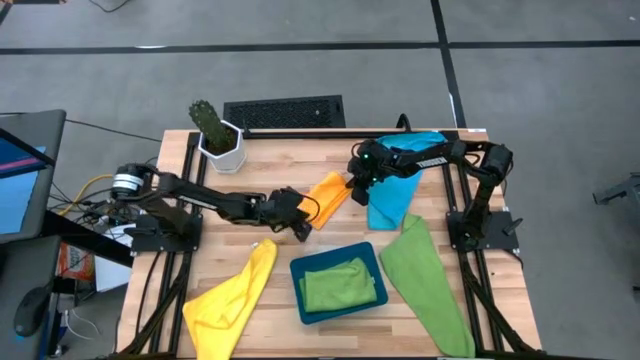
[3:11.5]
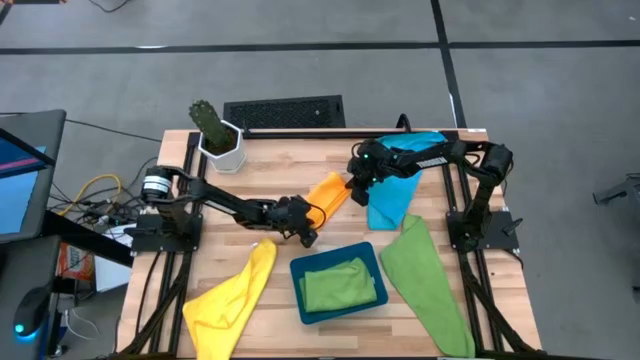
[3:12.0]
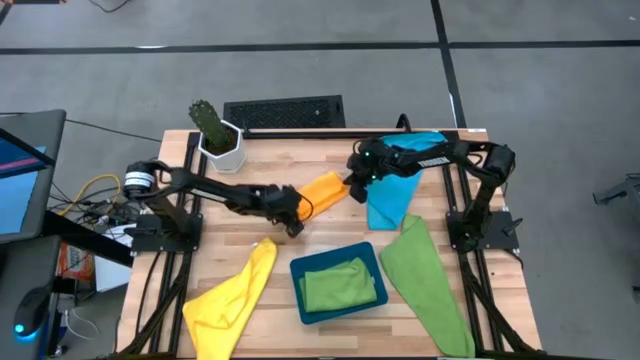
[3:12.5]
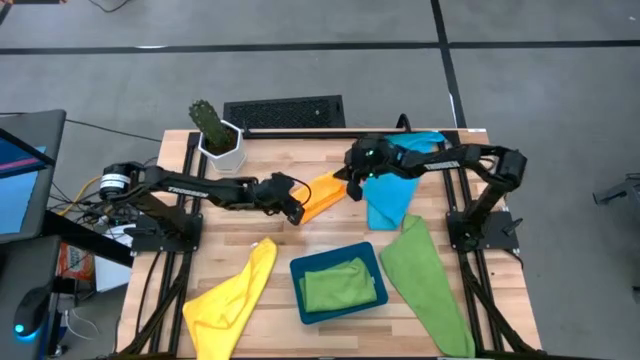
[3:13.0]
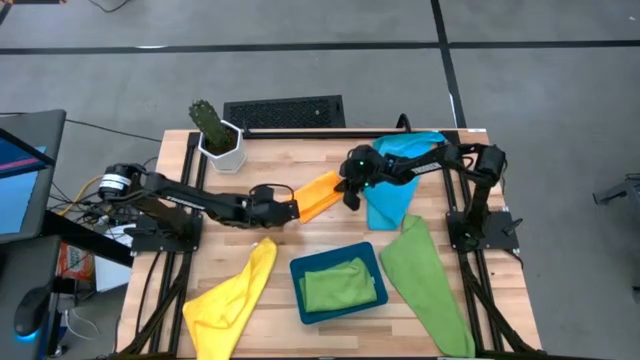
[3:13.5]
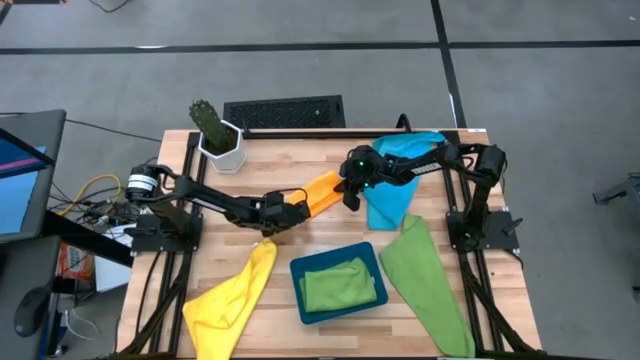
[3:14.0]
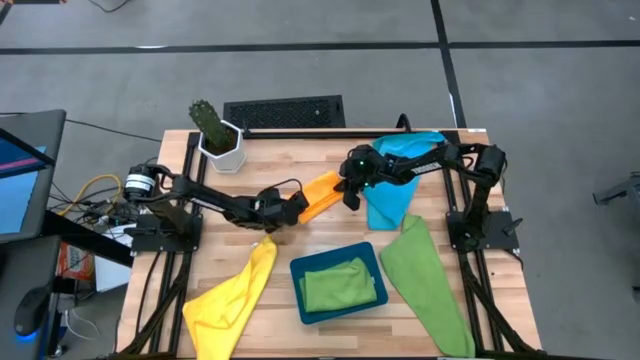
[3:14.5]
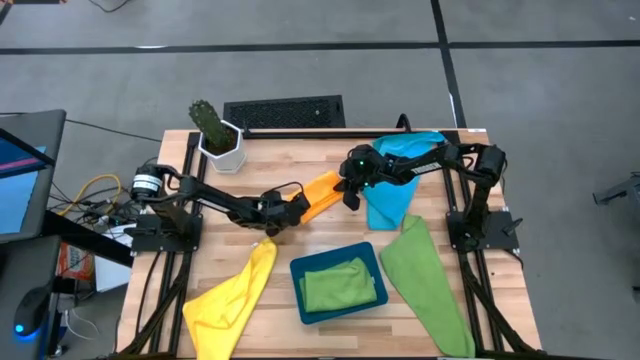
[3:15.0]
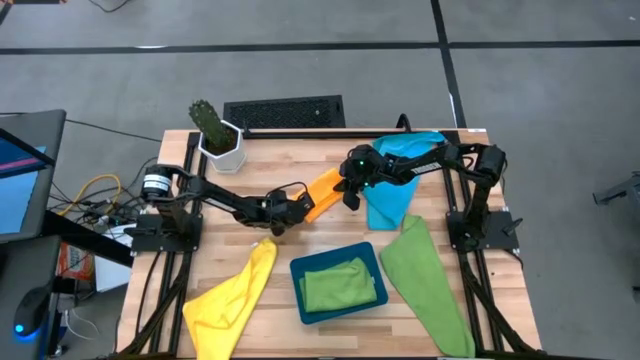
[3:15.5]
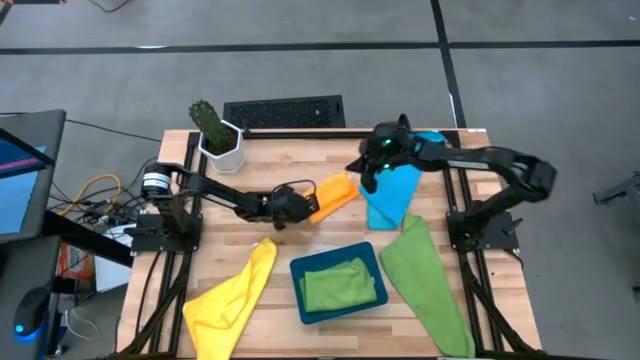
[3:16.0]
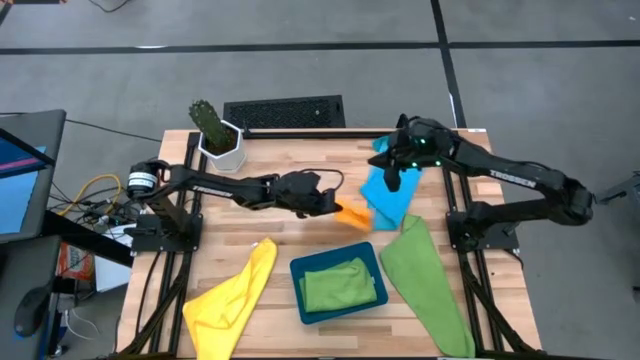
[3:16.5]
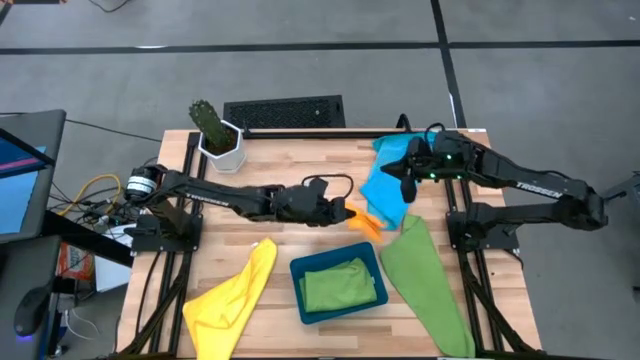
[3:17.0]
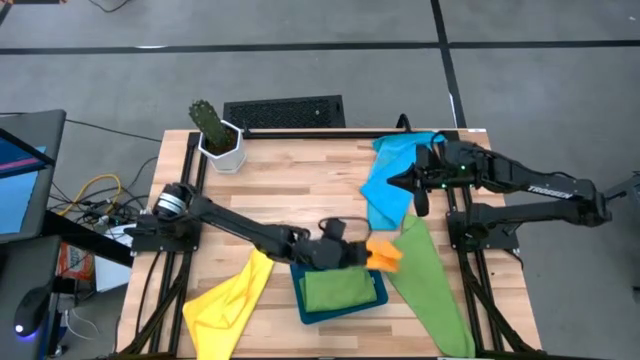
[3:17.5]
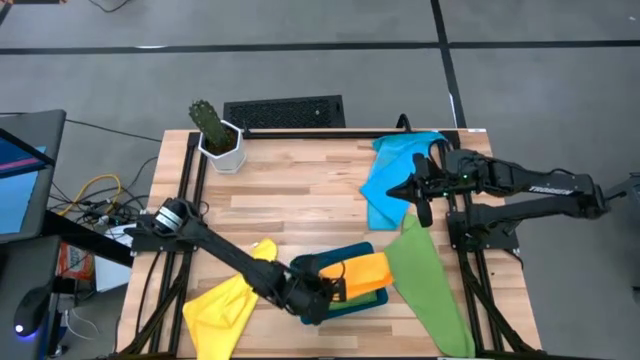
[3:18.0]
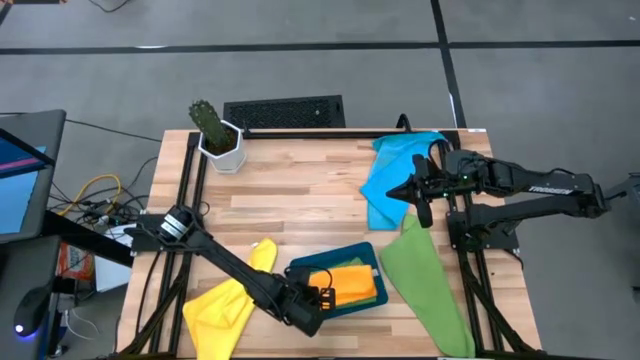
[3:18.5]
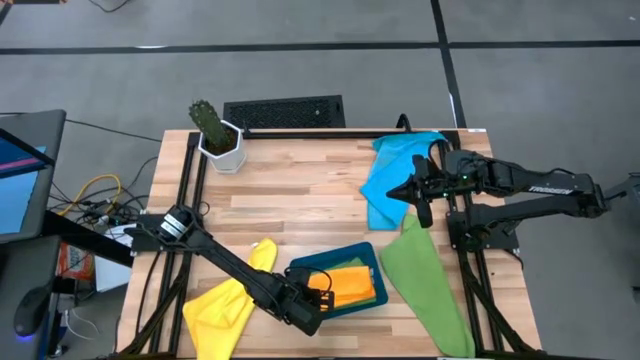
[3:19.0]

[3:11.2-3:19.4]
Task: Fold microfiber towels
Put the folded orange microfiber towel into the blue bin

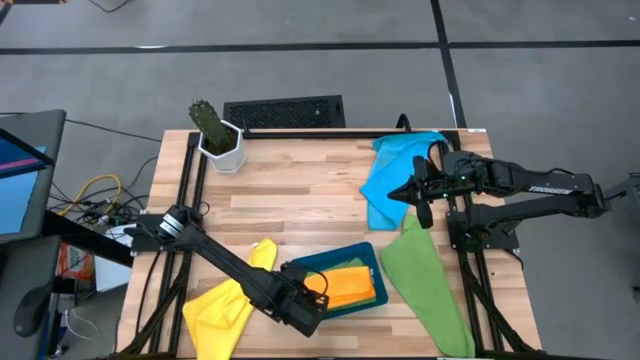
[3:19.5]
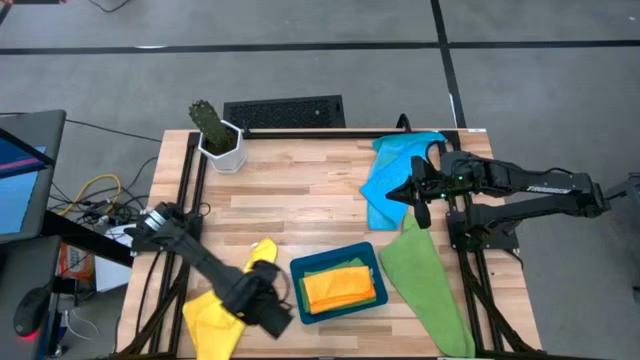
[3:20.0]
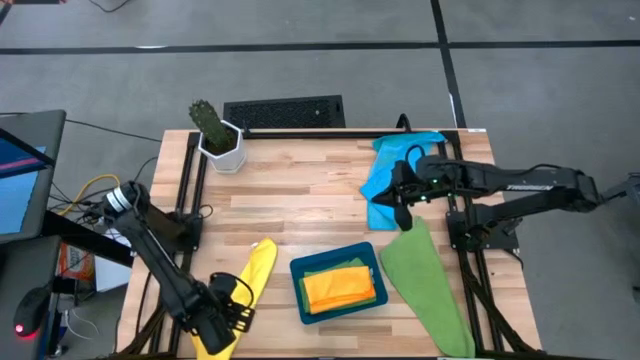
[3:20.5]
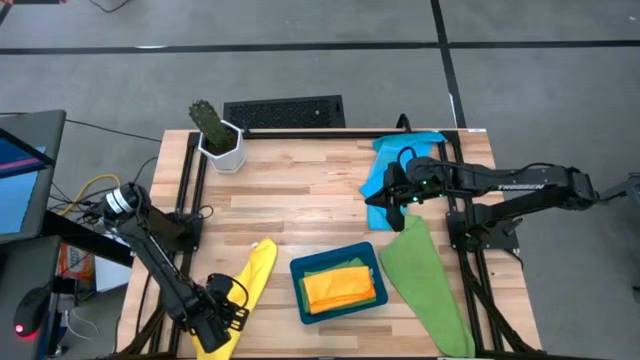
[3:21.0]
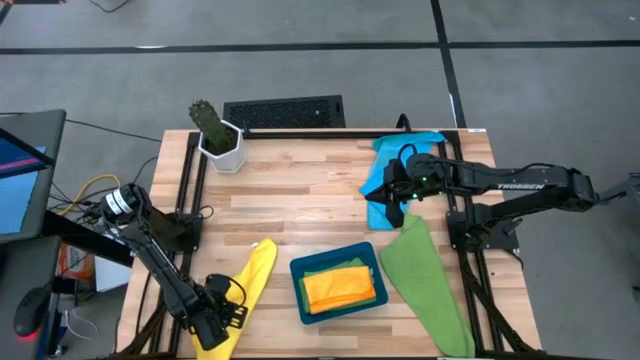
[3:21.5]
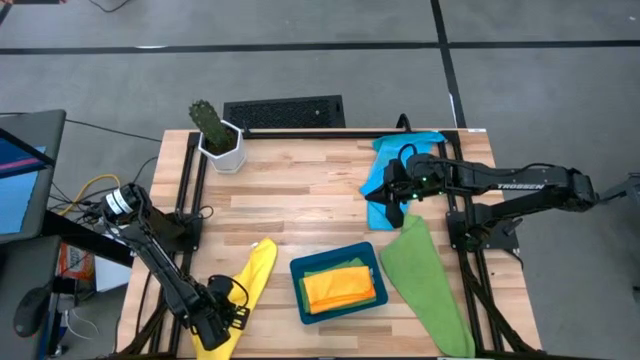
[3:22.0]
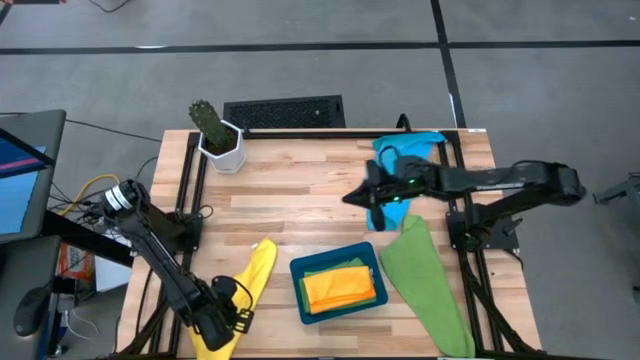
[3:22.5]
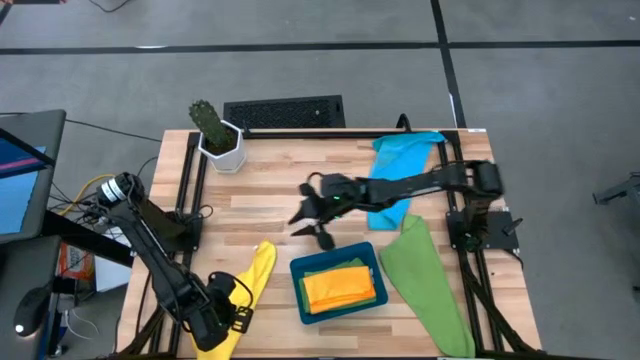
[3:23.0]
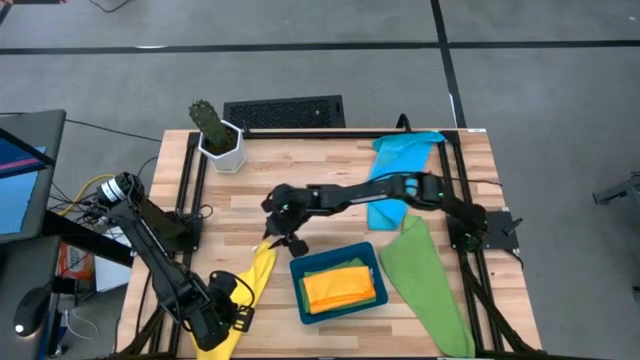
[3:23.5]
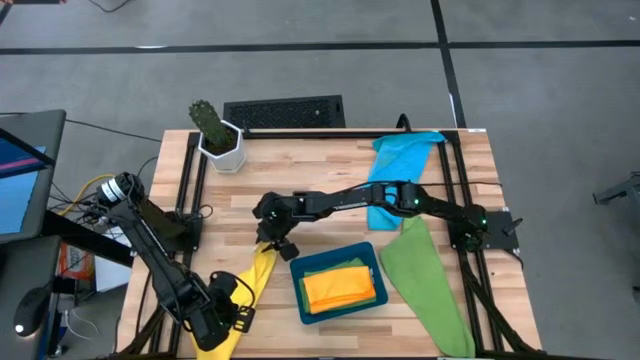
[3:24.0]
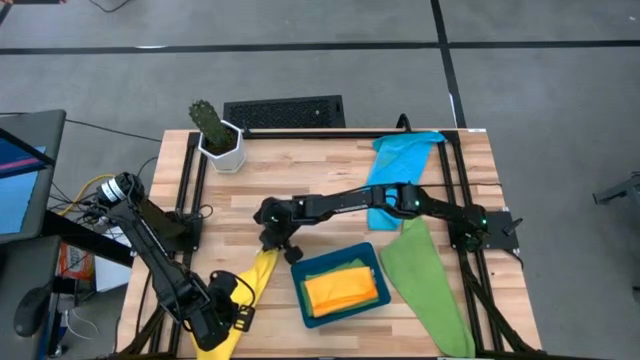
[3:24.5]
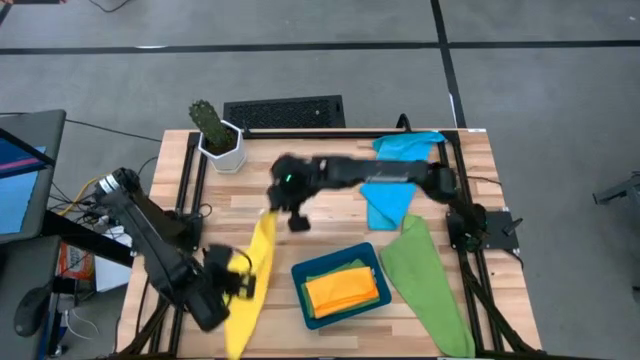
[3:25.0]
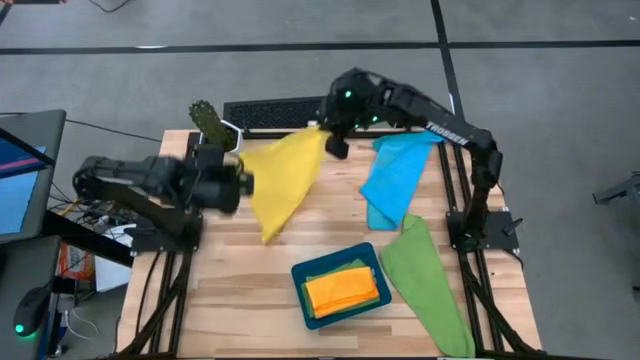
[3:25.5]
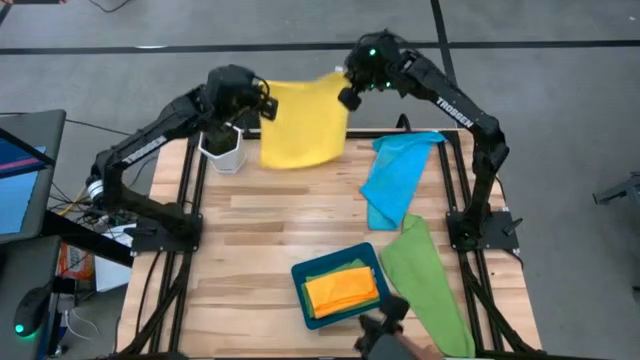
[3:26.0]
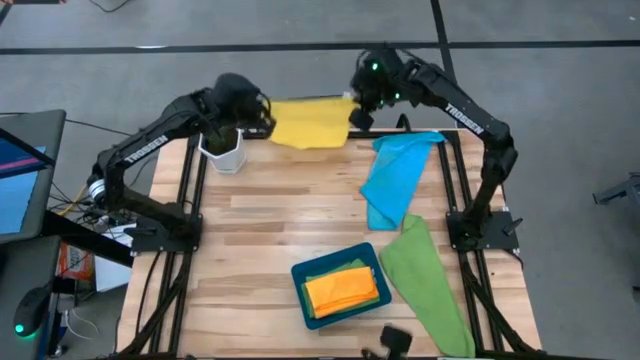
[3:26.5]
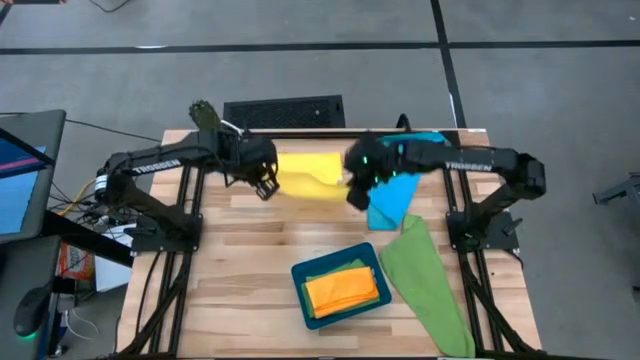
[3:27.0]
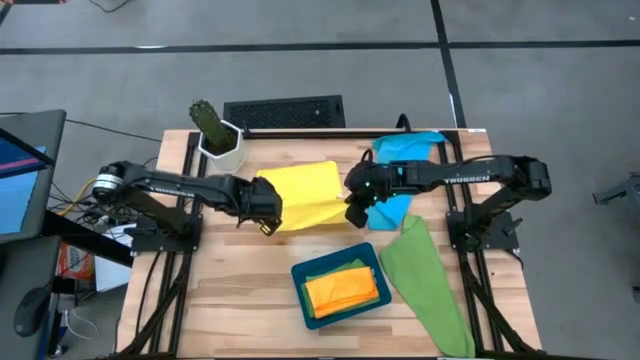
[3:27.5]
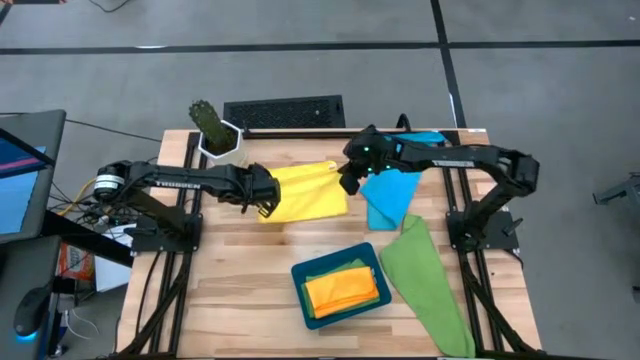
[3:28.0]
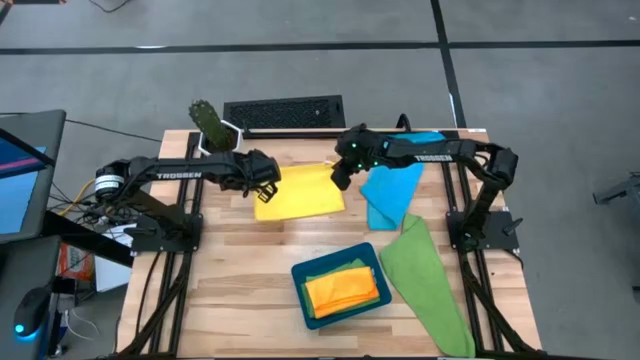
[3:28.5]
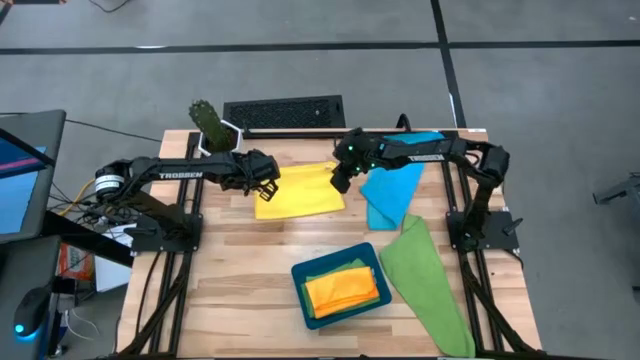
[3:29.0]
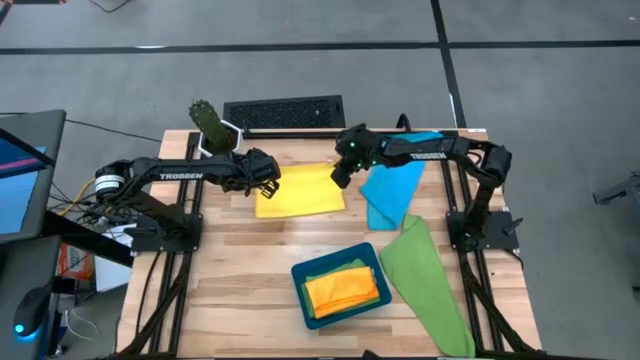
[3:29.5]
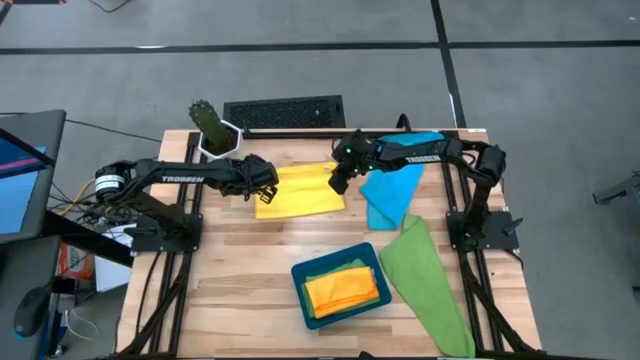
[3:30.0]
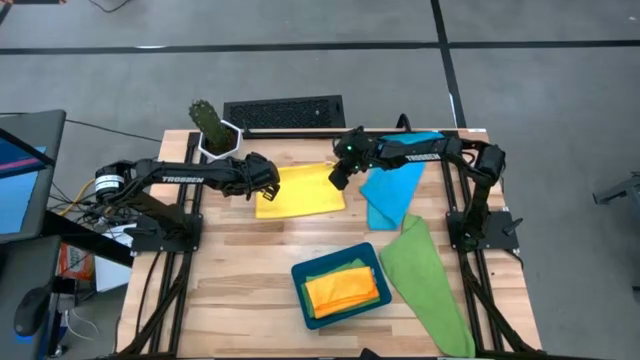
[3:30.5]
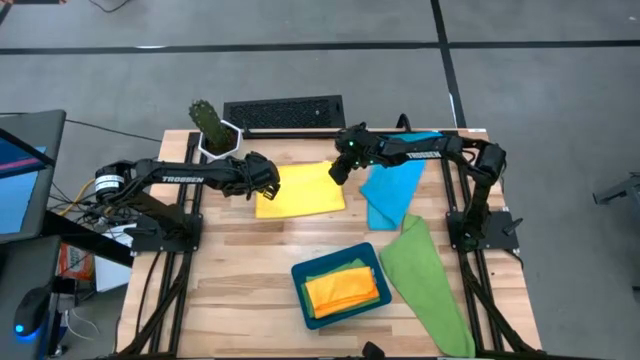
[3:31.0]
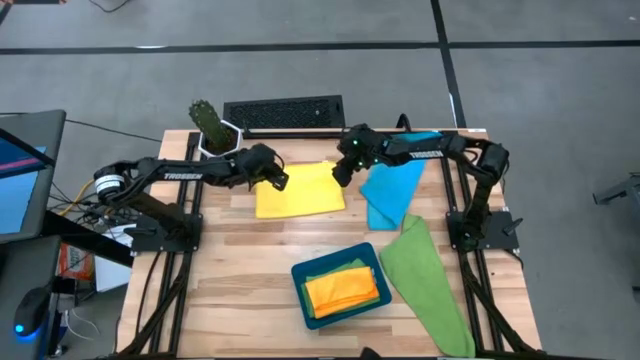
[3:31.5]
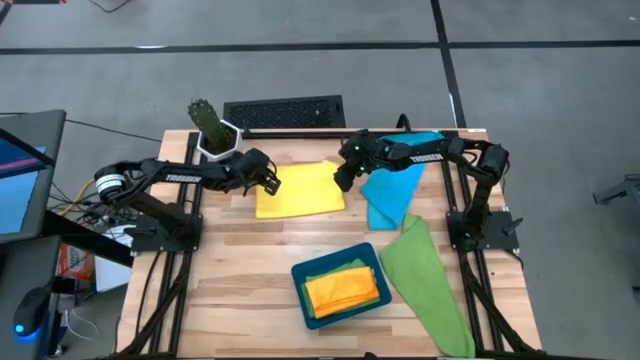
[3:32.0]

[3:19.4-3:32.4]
Fold the yellow microfiber towel
